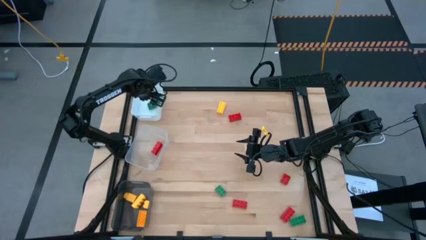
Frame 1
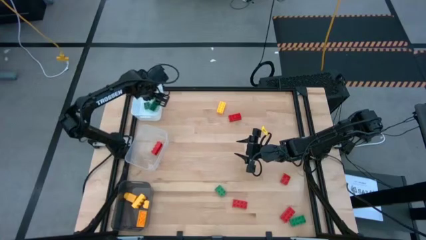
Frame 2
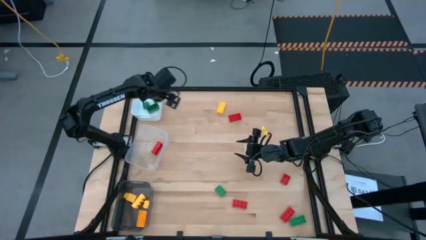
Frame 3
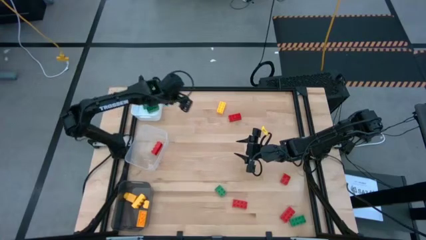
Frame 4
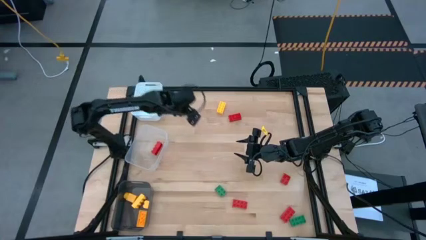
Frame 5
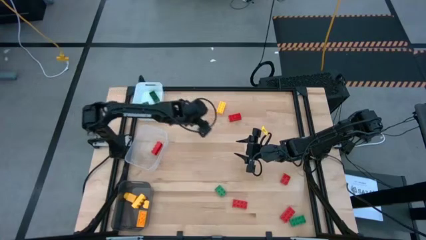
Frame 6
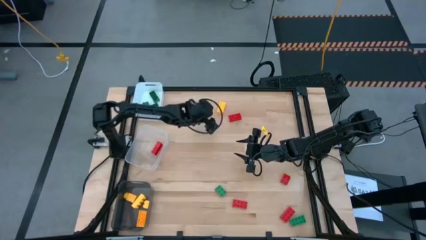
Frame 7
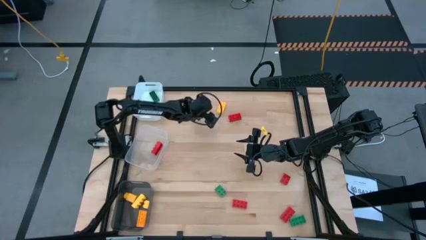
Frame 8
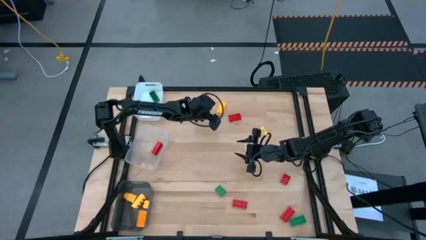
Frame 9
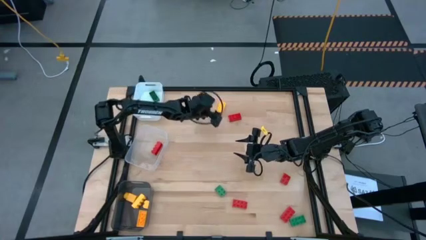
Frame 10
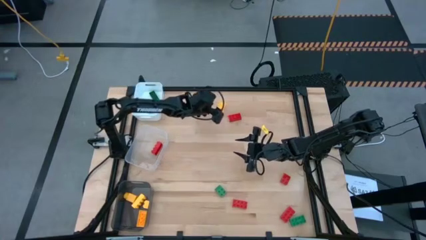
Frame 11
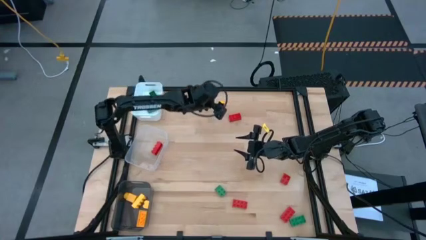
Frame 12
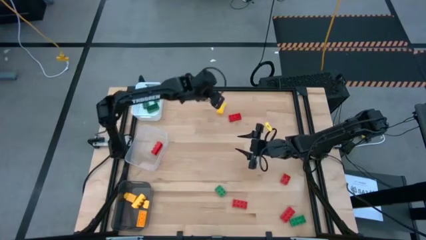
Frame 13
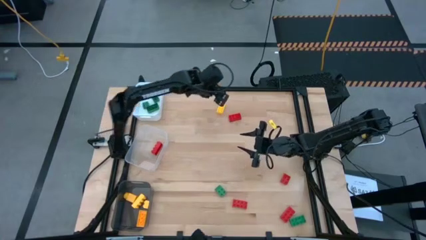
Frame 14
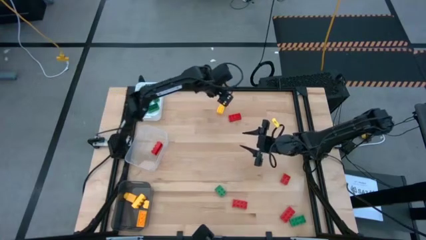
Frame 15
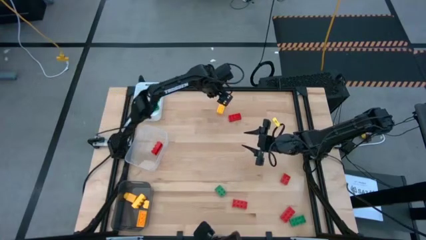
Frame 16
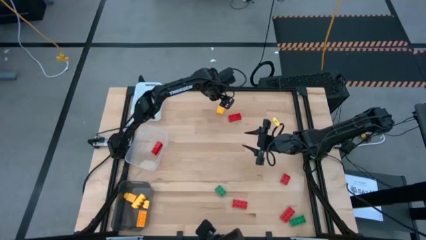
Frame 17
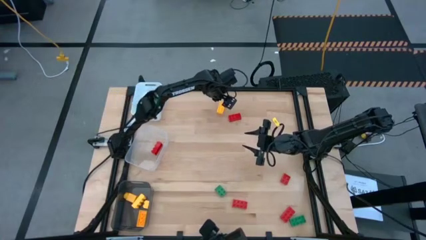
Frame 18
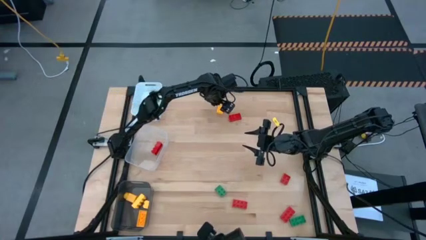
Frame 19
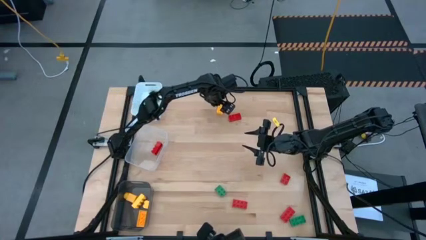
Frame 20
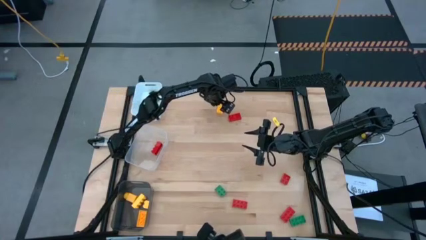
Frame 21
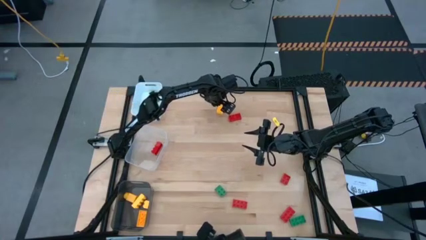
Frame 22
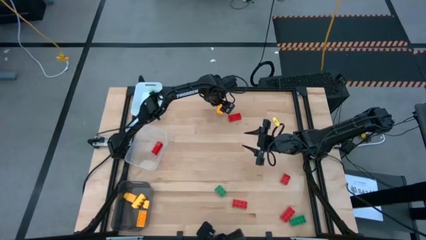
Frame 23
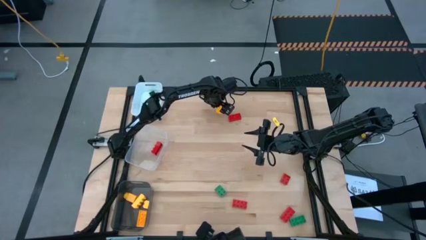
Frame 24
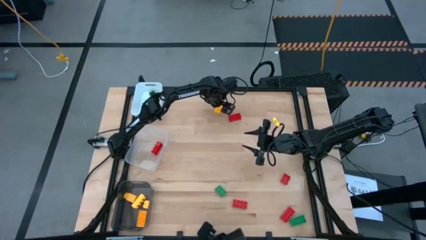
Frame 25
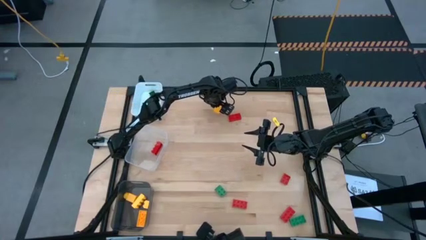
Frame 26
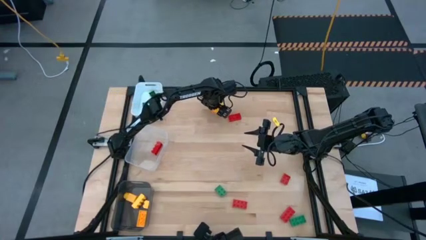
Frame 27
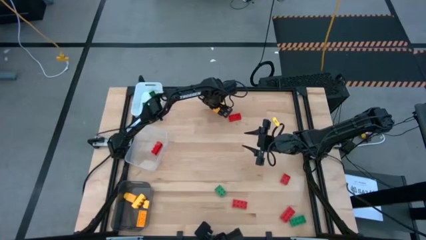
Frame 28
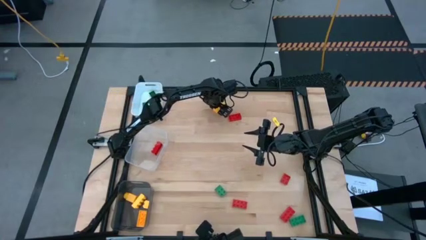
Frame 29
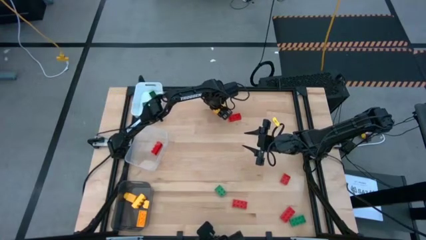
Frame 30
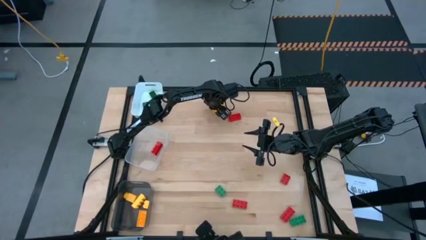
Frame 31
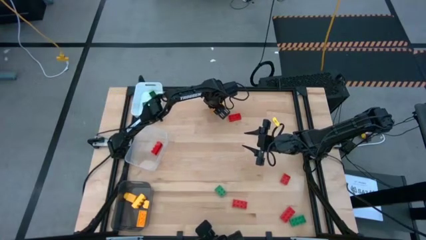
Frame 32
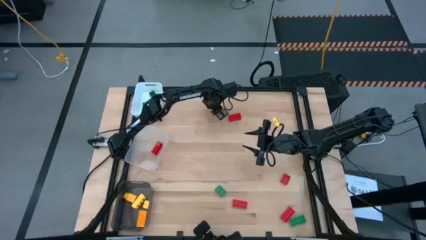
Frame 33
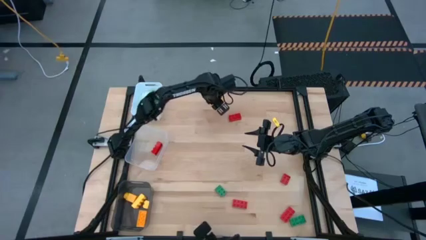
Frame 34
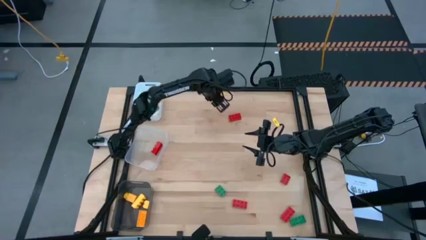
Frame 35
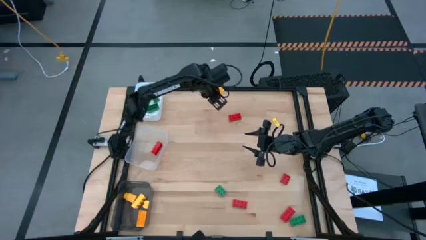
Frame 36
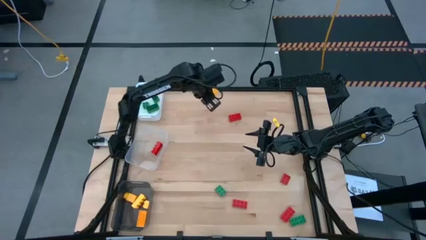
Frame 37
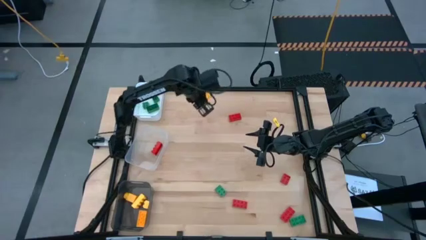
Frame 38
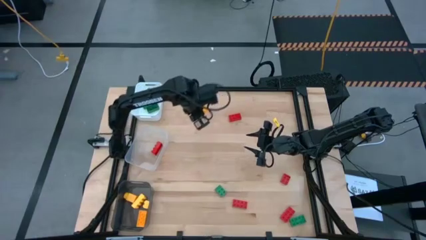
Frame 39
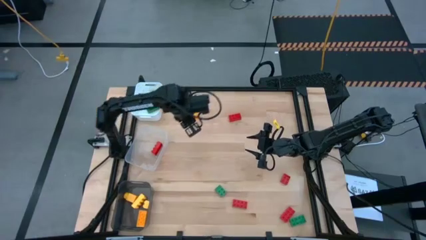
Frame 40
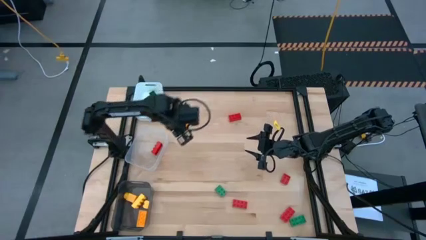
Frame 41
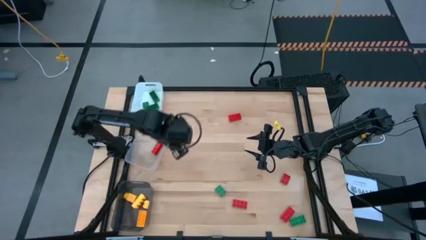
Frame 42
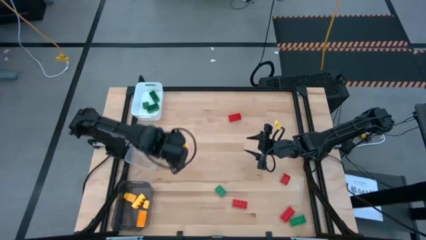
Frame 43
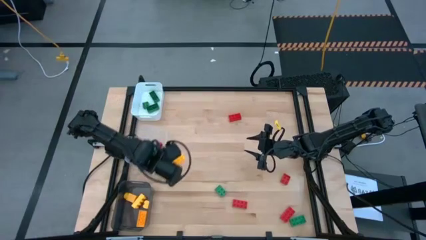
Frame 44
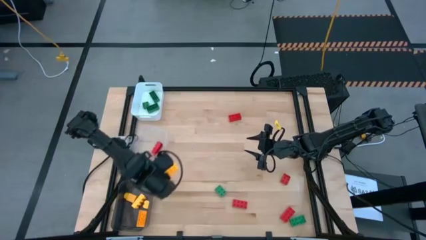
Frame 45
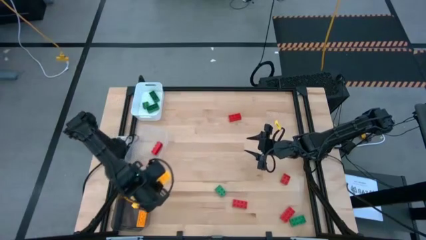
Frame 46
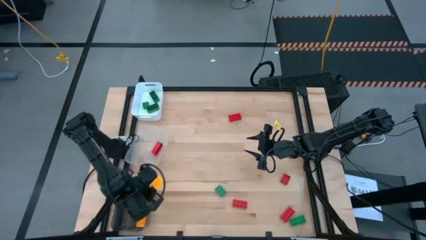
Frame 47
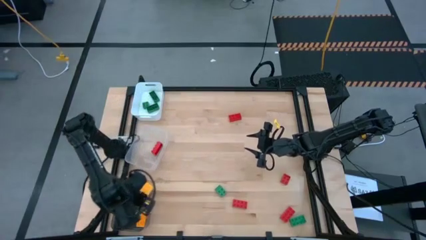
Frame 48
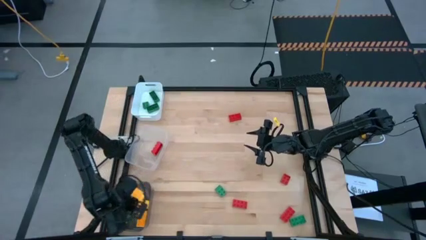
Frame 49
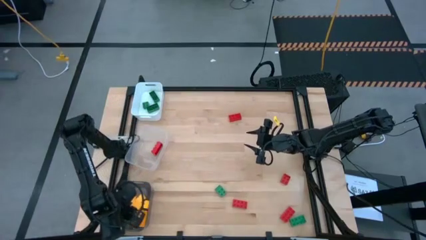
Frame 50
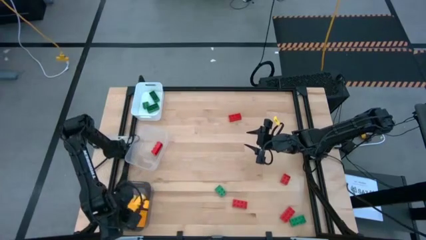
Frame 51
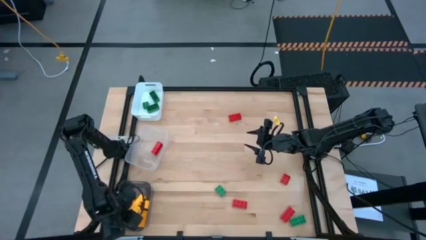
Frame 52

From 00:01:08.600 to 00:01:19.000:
Task: Sort & place blocks by color
Put the yellow game piece into the black bin

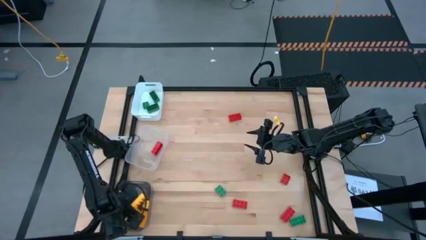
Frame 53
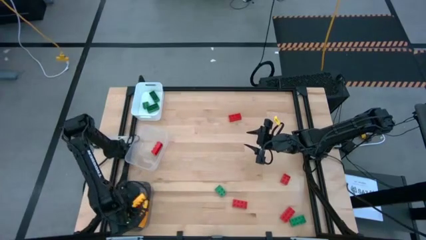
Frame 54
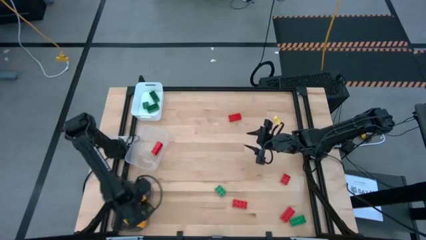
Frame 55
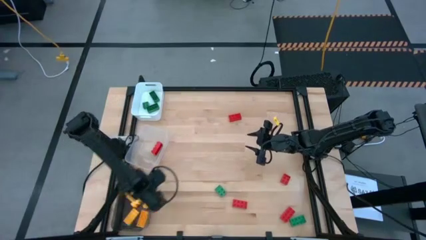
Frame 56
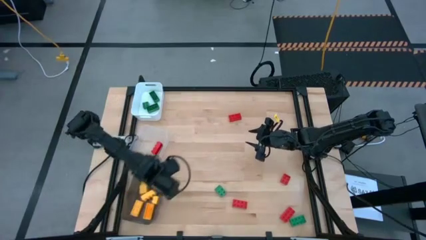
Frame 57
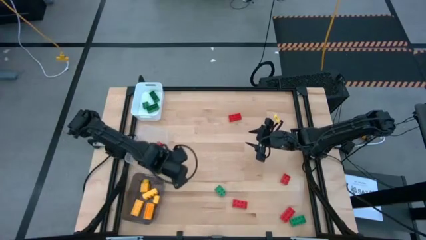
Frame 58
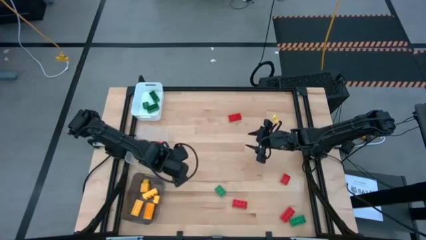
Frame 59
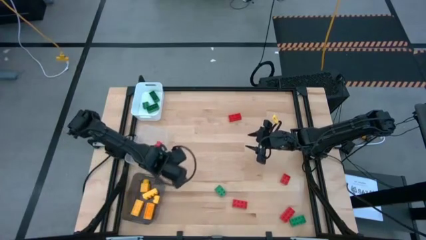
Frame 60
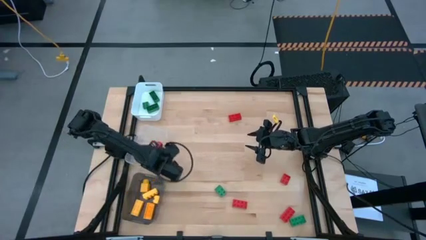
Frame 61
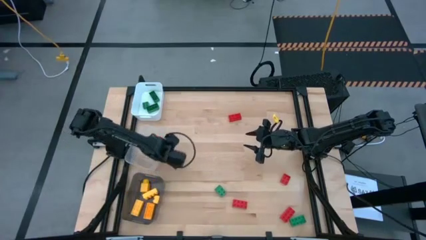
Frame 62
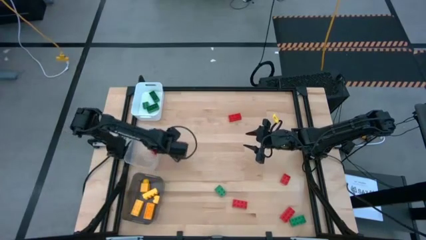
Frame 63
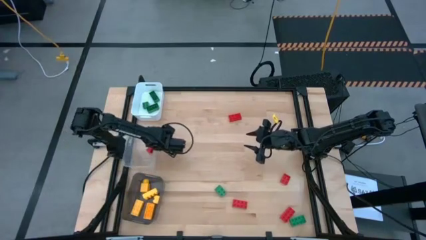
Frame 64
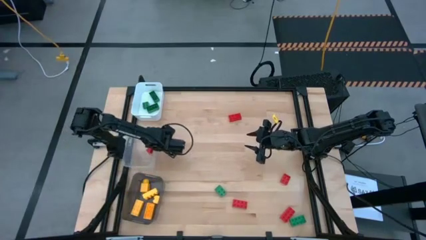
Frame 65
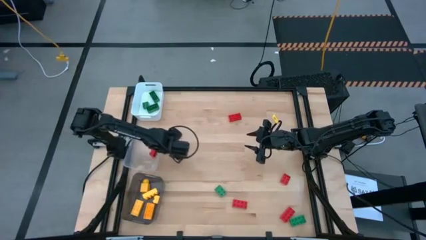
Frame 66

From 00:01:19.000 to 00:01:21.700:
Adjust the transparent bin

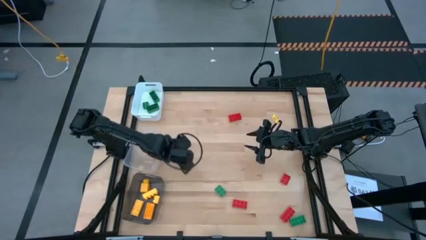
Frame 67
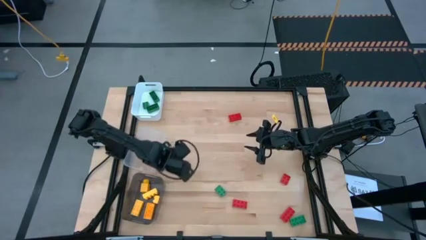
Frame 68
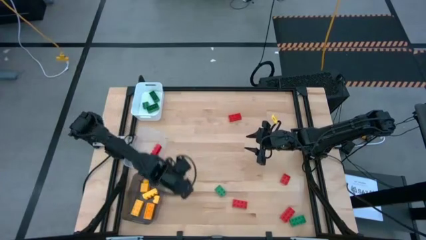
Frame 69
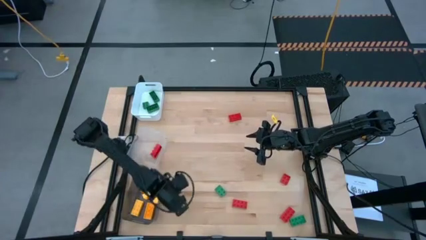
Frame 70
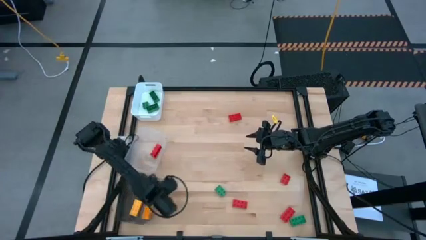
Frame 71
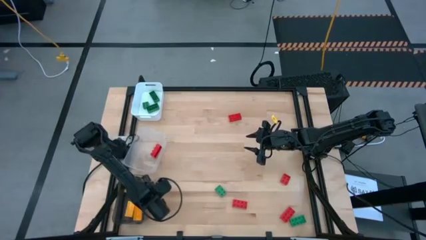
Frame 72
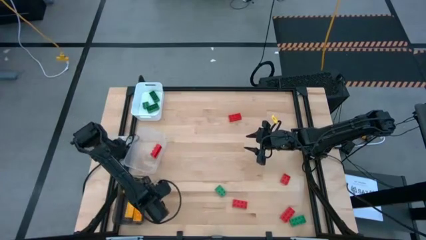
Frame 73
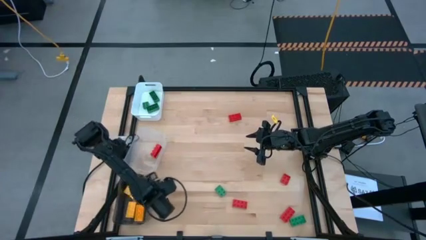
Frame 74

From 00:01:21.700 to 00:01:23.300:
Adjust the black bin

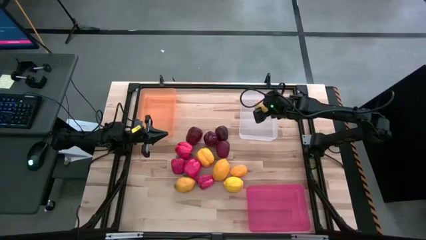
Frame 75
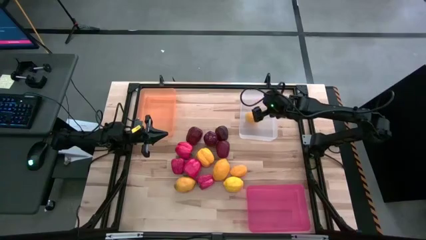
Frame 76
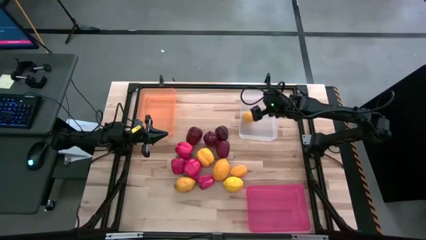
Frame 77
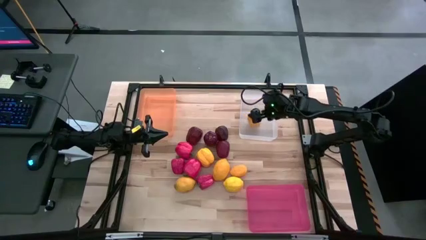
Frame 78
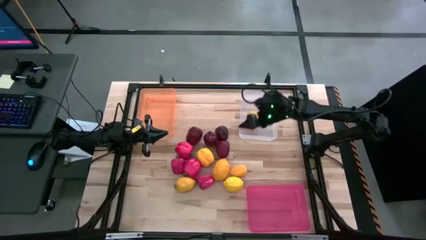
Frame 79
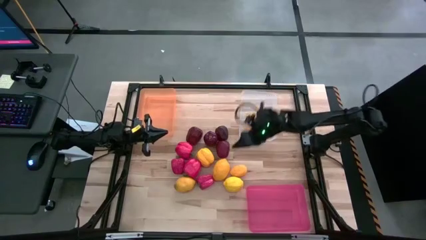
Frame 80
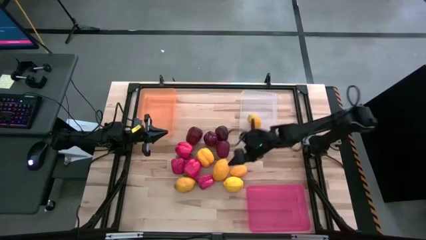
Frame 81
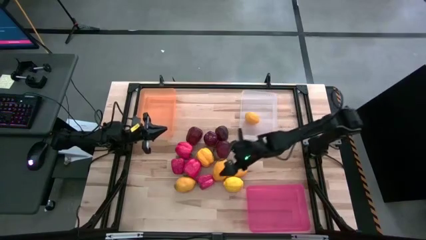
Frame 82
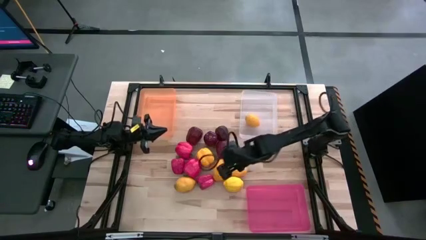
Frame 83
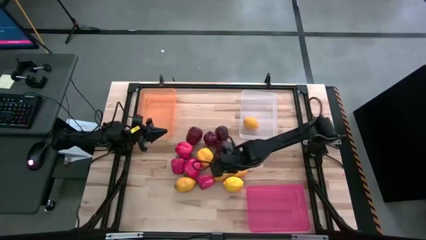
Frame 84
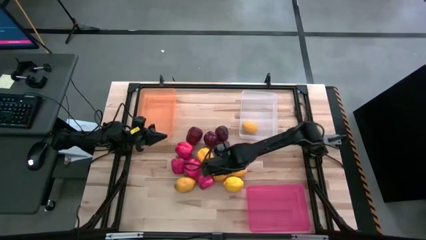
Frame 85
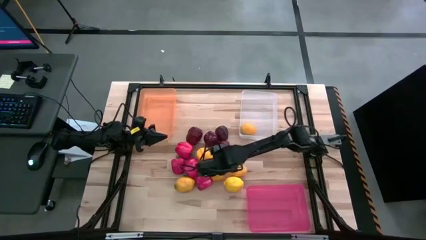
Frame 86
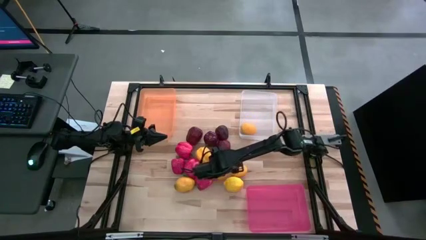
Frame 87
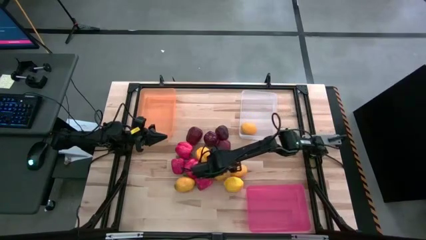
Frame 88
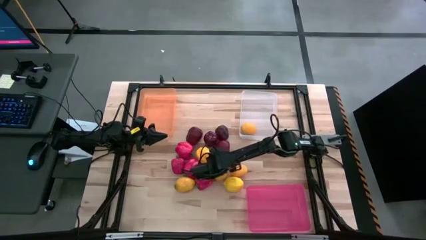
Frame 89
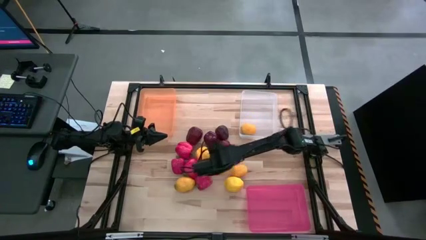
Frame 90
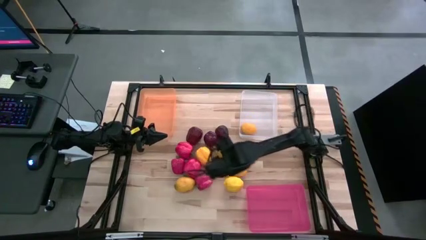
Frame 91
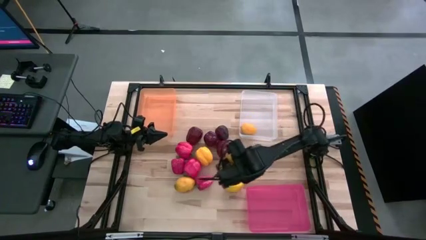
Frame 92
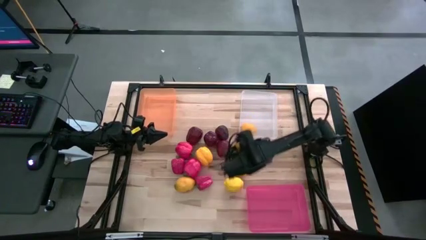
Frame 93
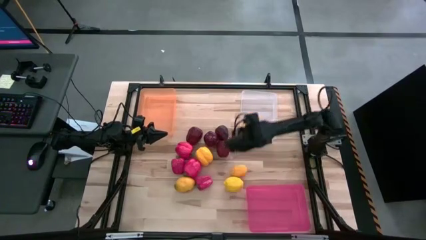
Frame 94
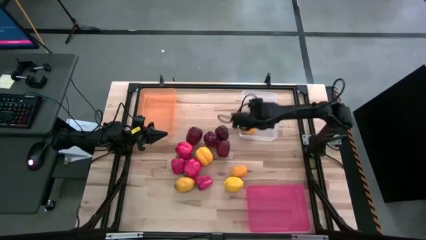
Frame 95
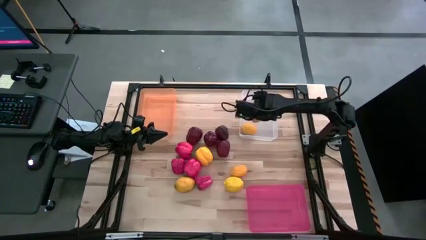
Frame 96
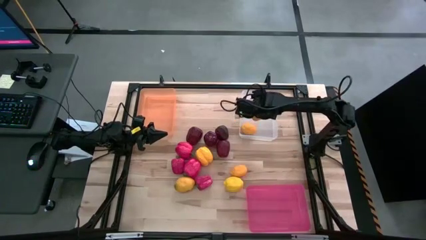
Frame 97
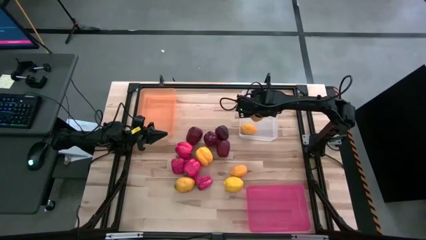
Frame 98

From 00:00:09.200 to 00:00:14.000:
Task: Sort produce into baskets
Put the lemon into the white bin
